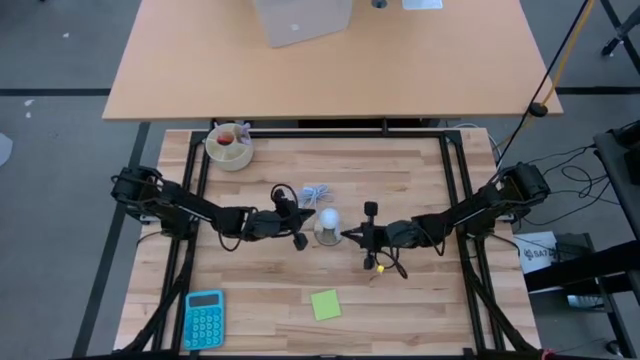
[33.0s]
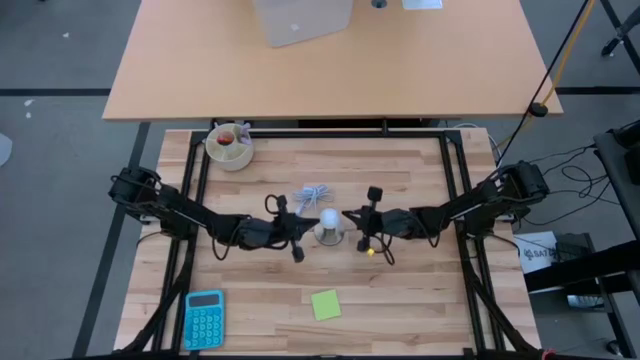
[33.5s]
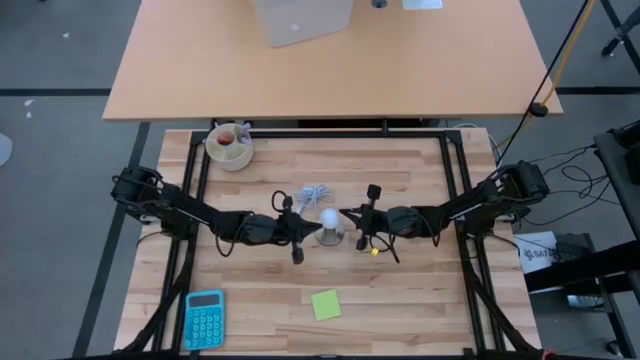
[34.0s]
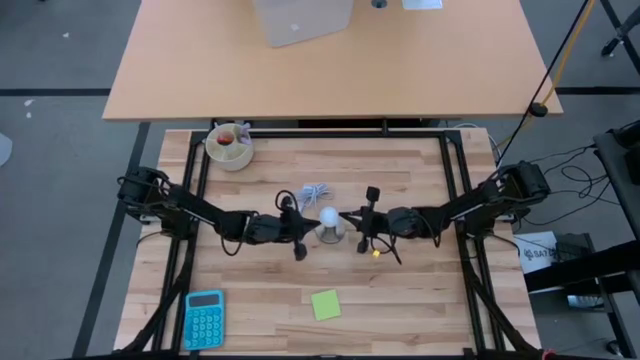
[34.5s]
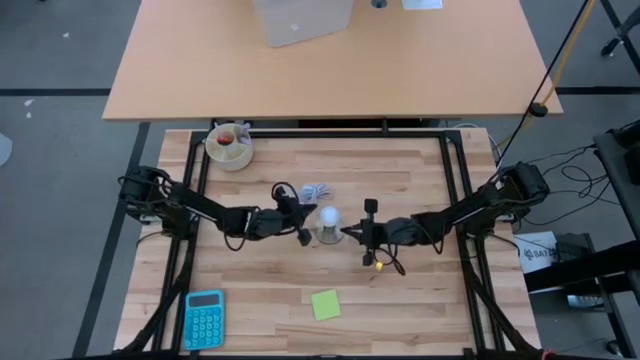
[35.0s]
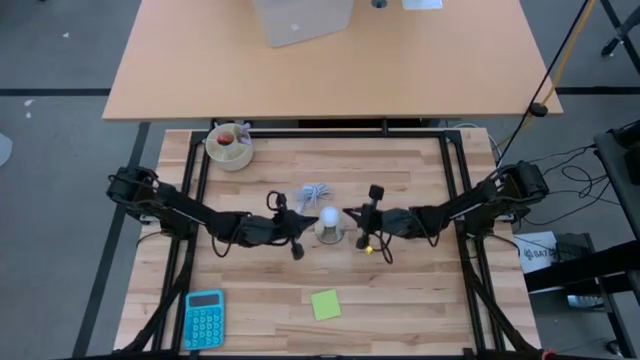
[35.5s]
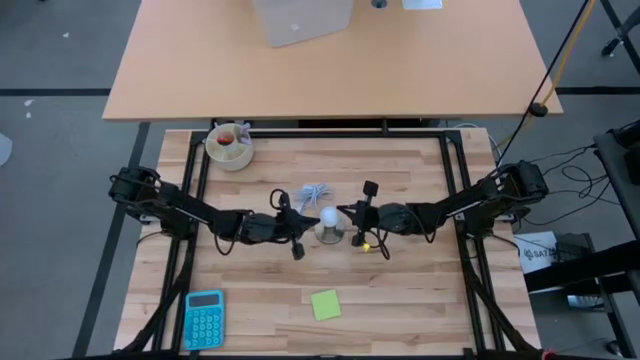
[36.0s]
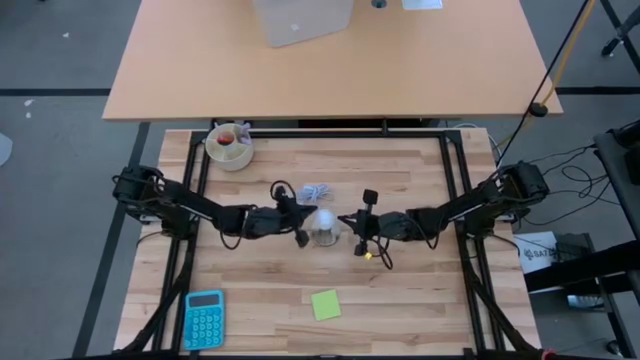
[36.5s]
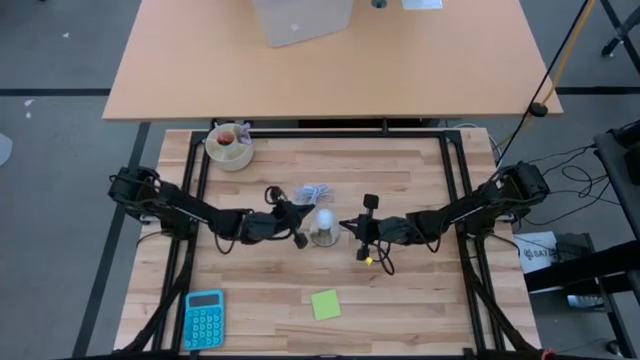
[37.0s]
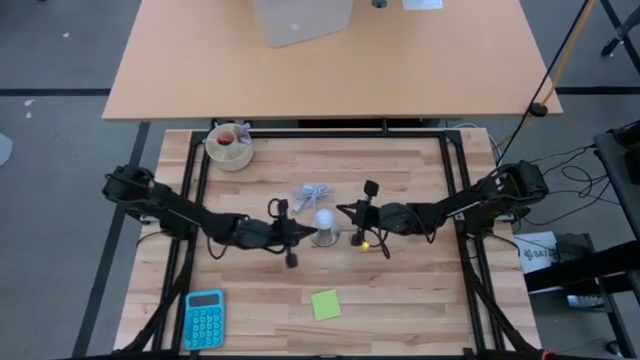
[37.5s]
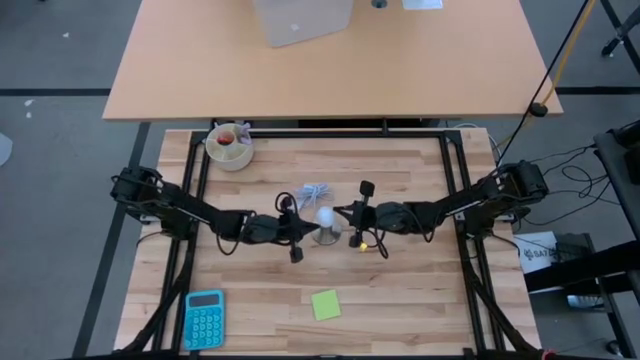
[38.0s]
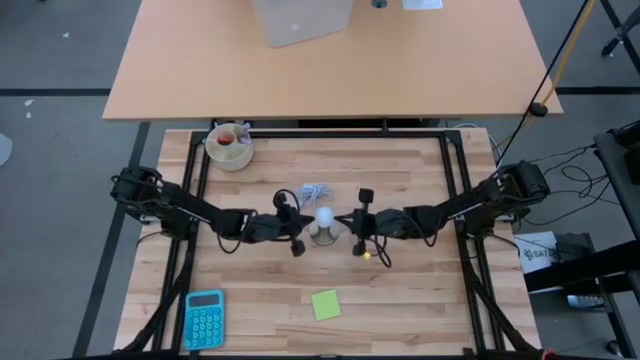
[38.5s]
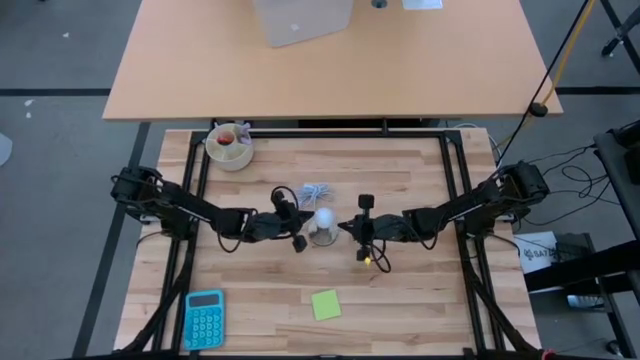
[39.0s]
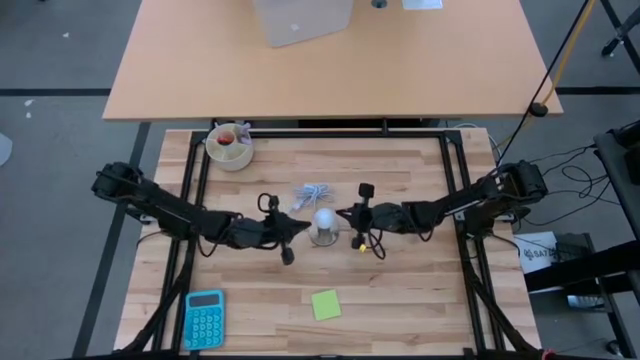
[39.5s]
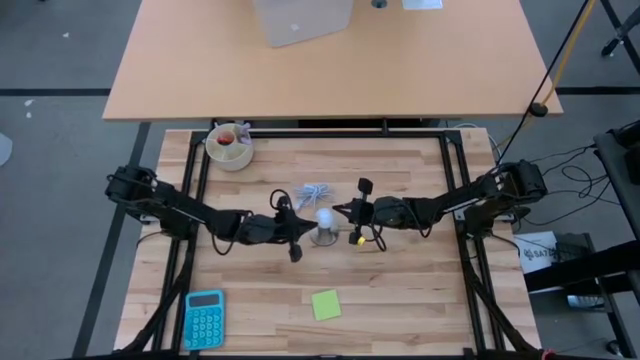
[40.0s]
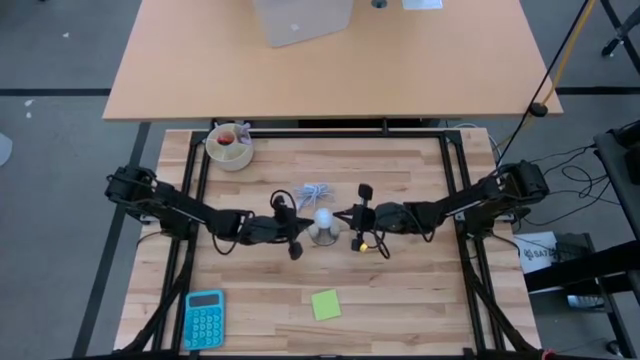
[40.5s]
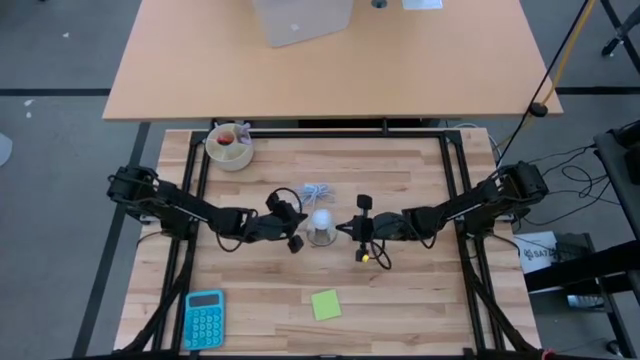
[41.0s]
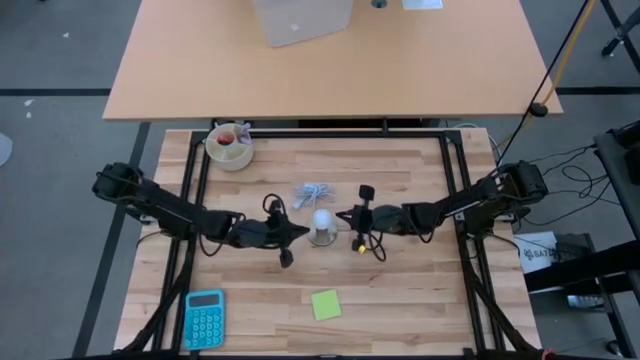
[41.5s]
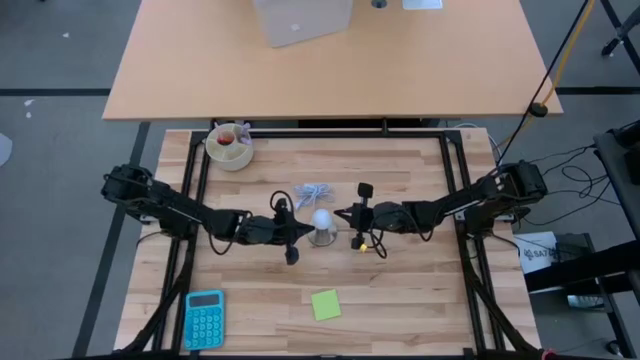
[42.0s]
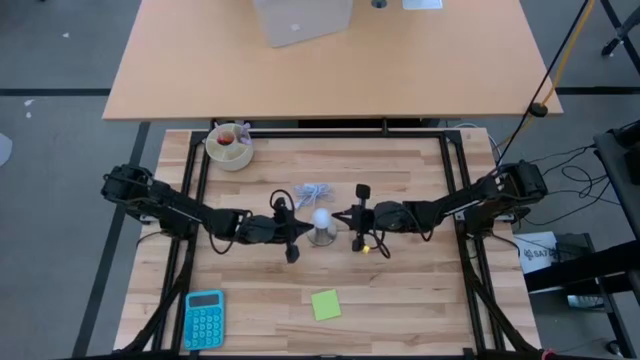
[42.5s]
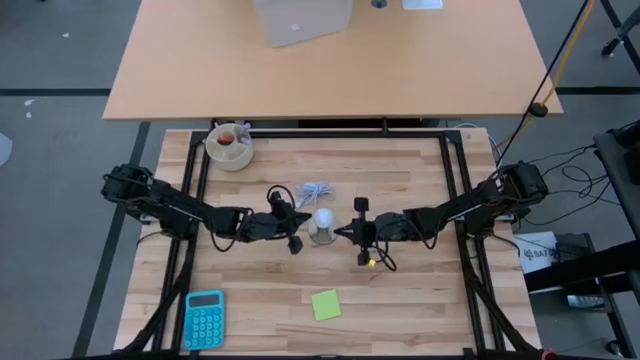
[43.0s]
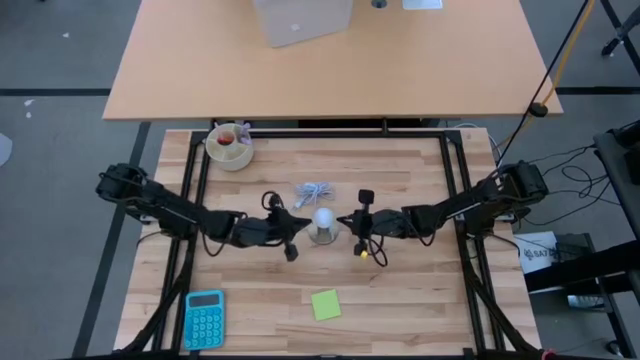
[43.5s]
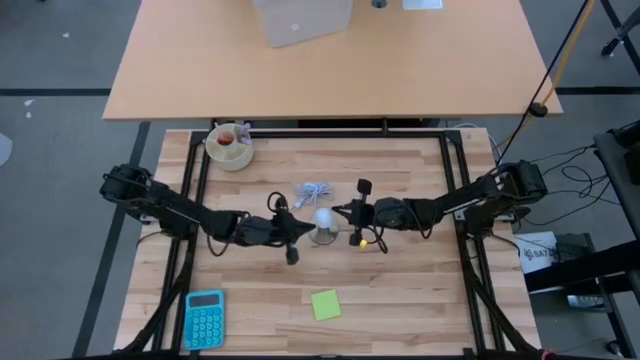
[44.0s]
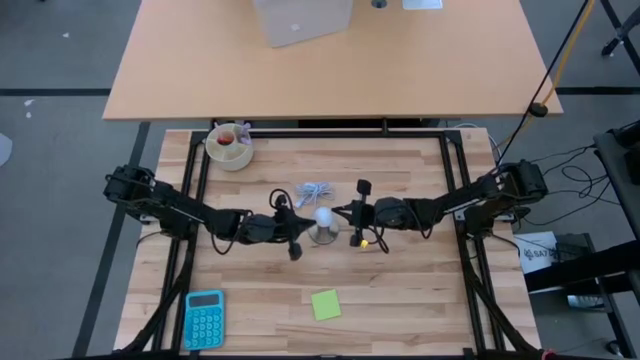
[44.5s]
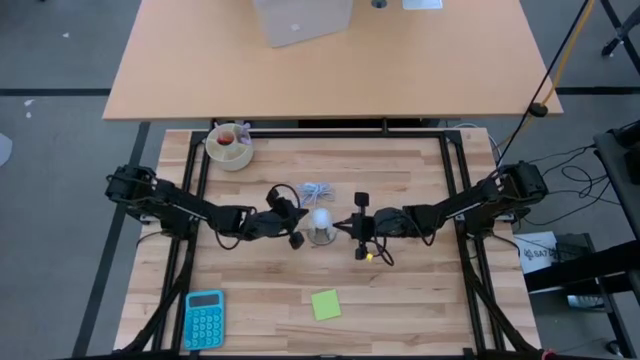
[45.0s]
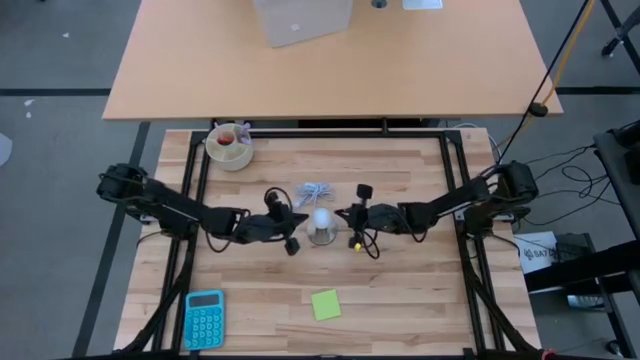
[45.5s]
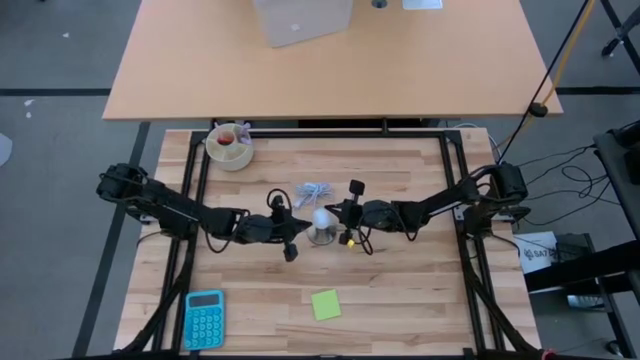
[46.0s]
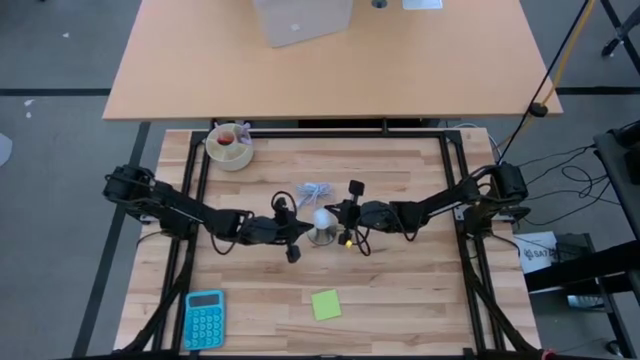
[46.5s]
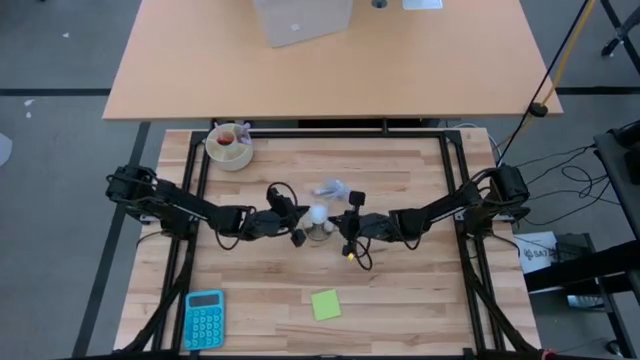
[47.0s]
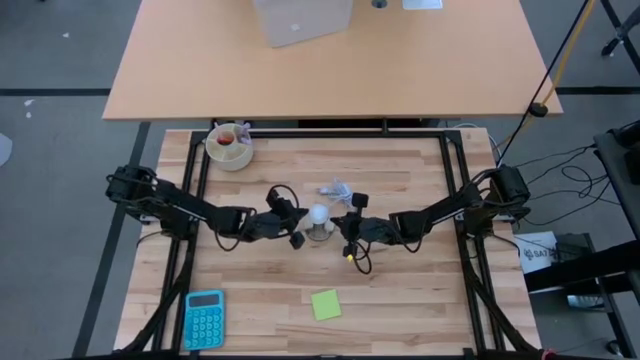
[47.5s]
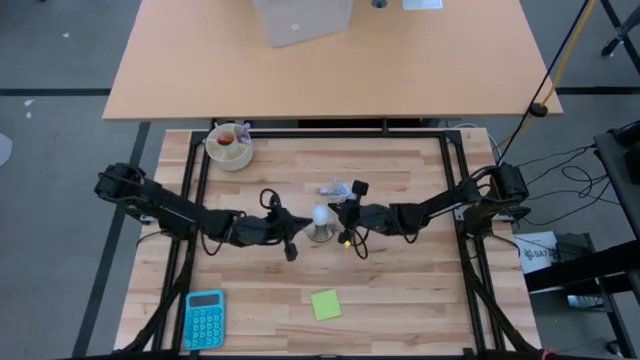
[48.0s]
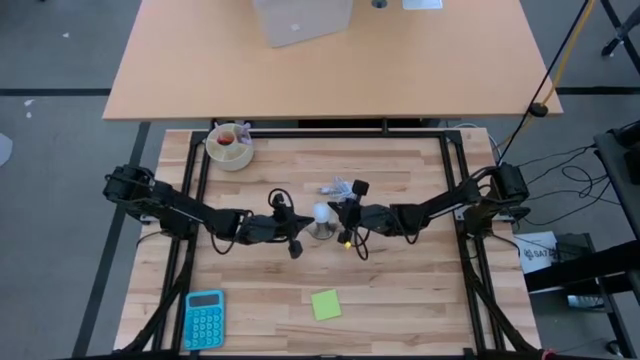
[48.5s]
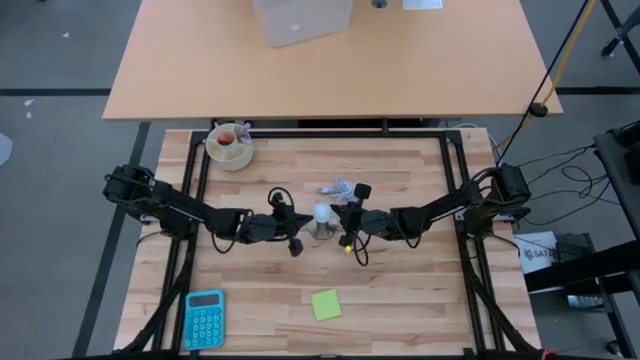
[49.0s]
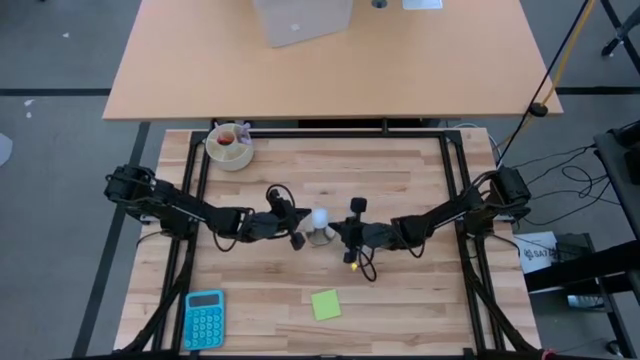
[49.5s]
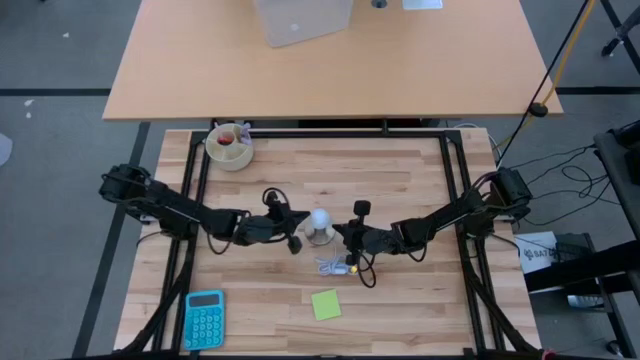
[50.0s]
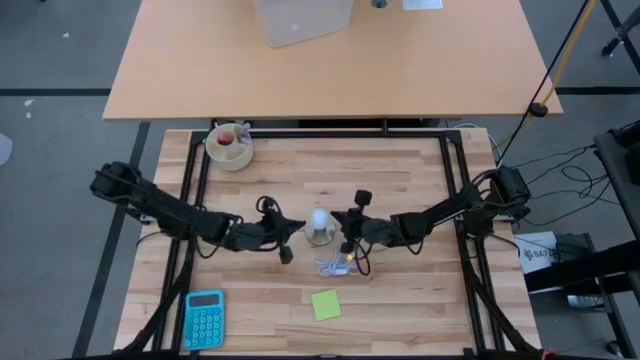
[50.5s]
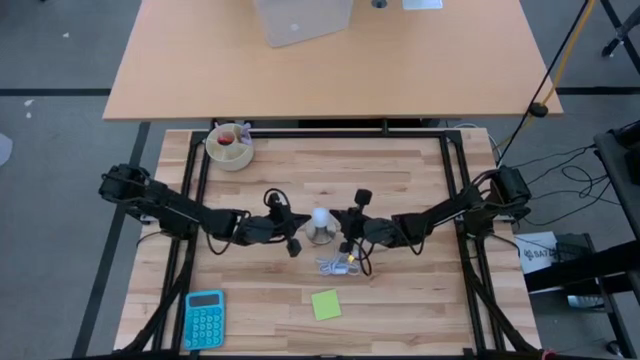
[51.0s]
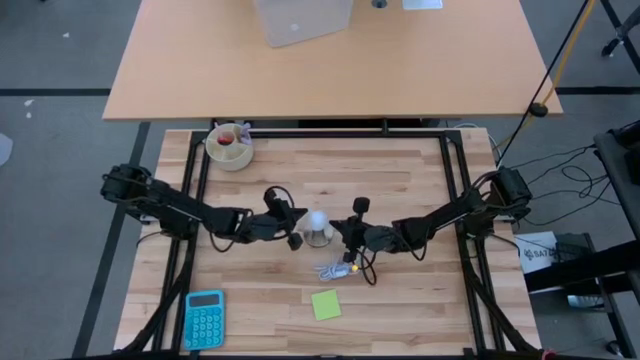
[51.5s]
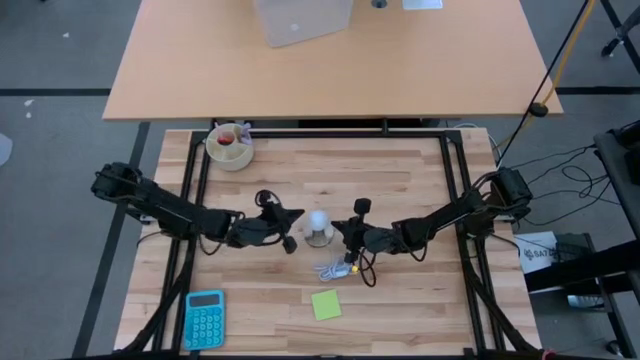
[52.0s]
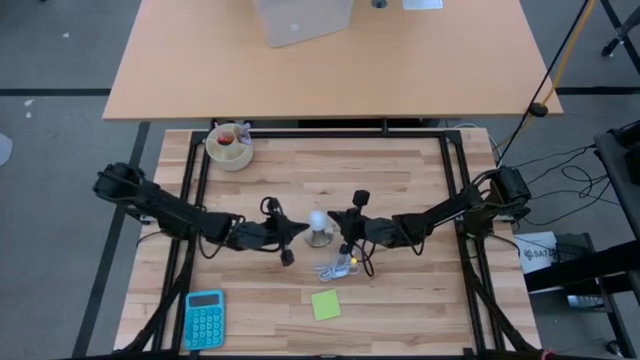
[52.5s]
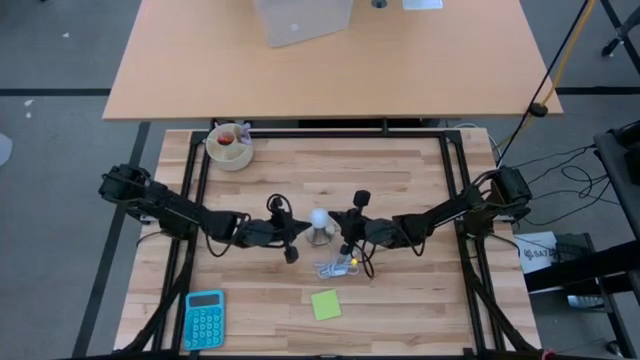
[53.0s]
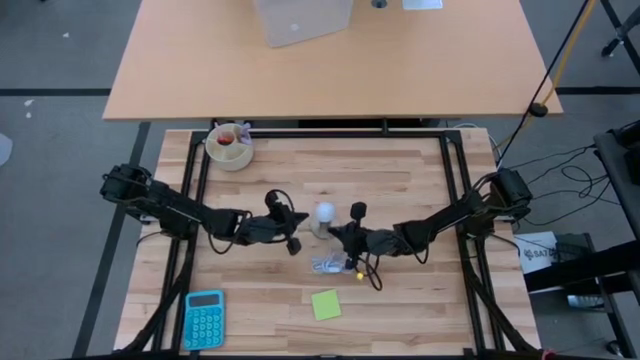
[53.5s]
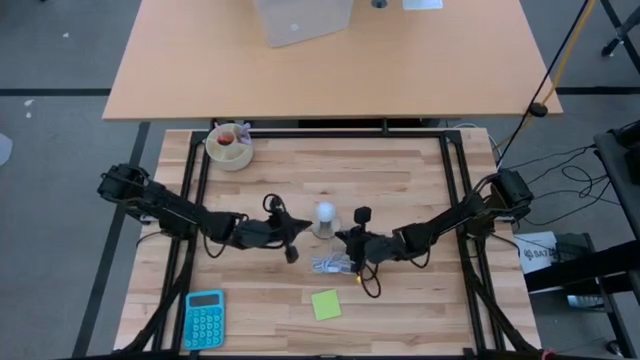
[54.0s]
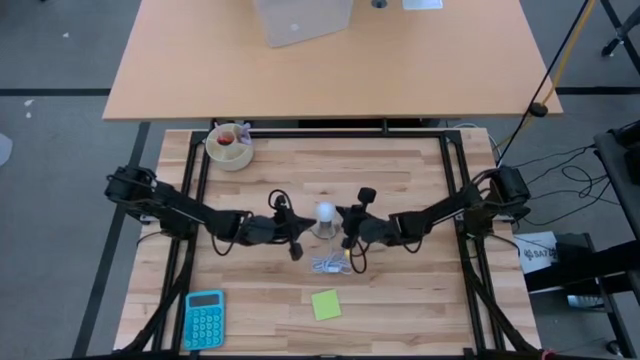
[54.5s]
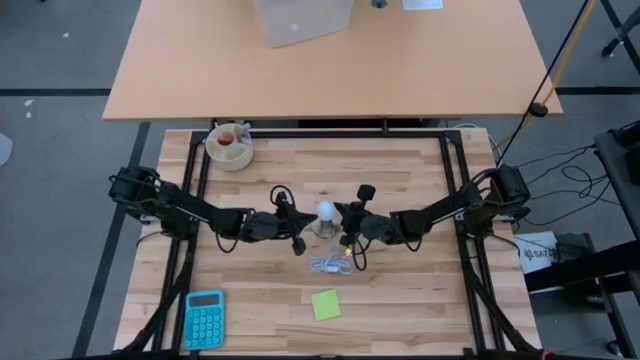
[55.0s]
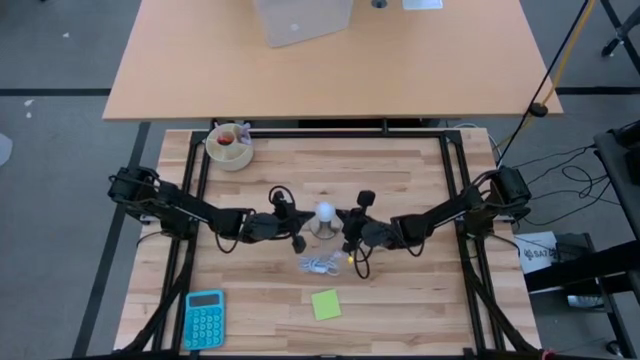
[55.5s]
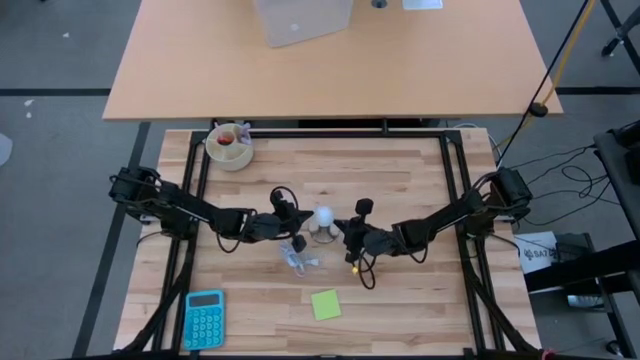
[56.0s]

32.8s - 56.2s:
Task: Screw lightbulb
Insert the lightbulb into the lamp
